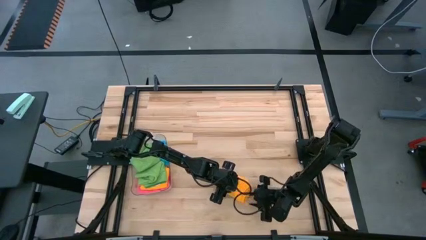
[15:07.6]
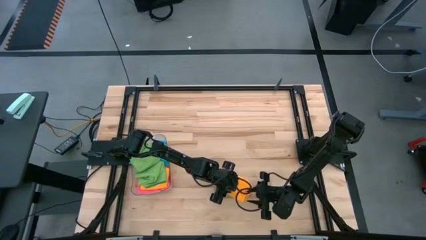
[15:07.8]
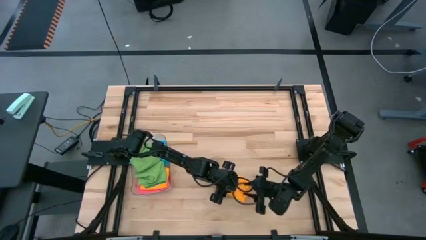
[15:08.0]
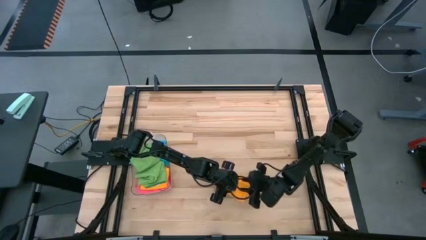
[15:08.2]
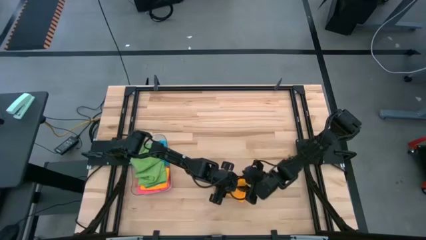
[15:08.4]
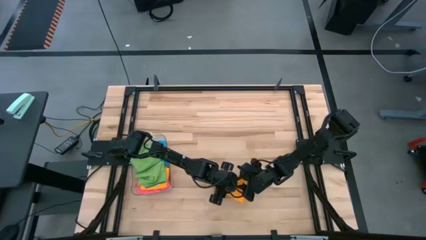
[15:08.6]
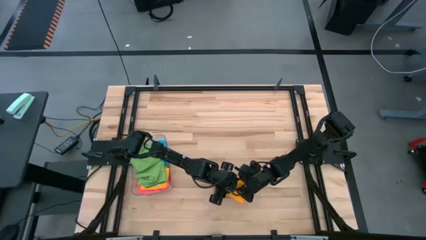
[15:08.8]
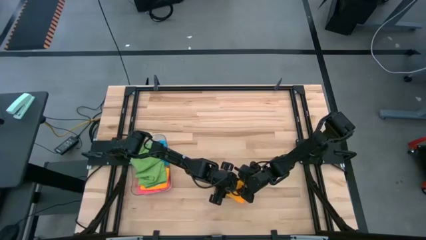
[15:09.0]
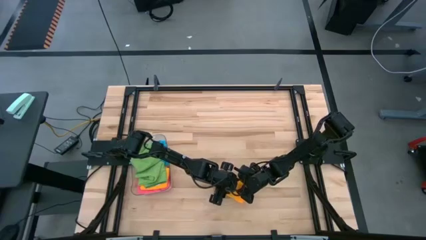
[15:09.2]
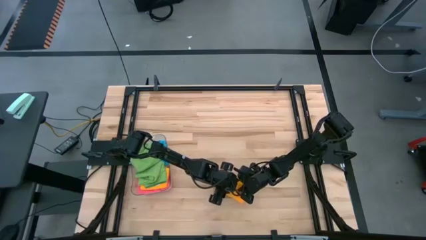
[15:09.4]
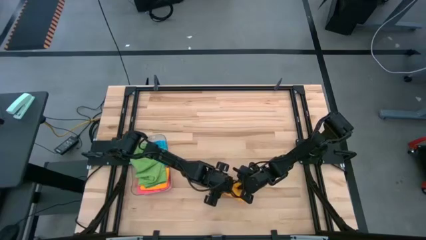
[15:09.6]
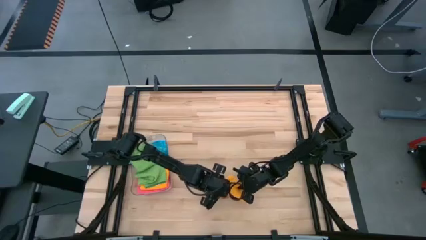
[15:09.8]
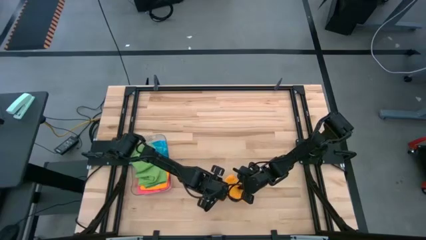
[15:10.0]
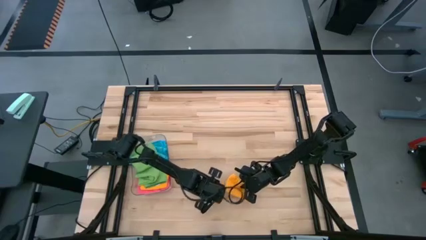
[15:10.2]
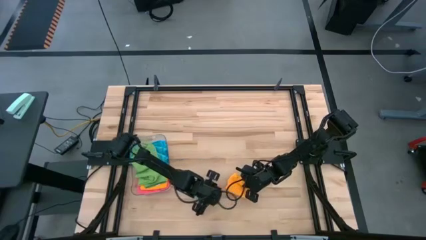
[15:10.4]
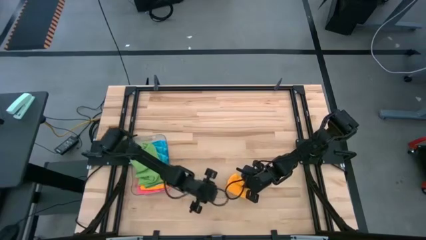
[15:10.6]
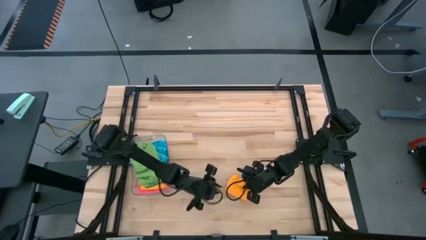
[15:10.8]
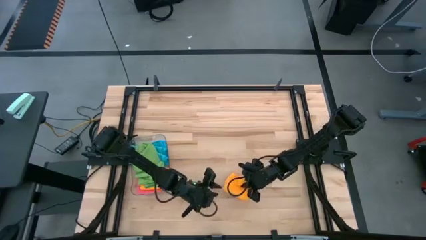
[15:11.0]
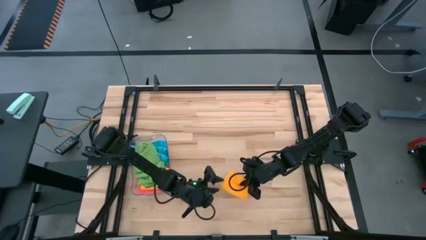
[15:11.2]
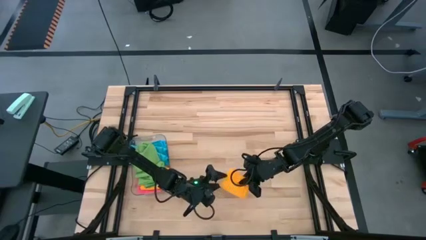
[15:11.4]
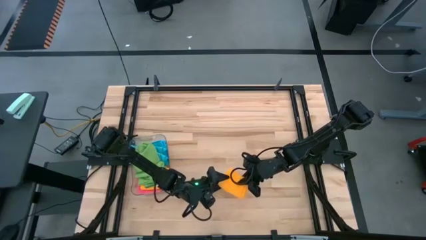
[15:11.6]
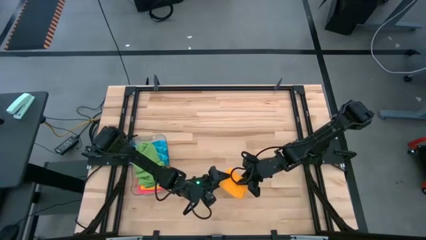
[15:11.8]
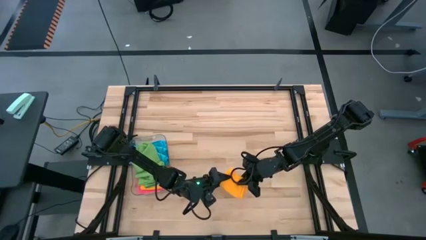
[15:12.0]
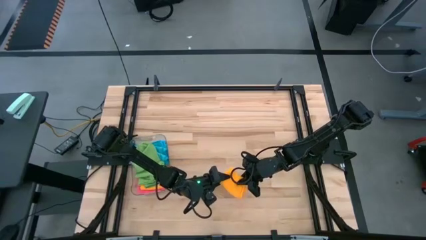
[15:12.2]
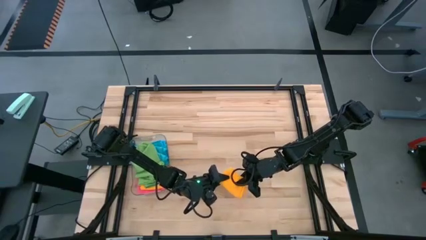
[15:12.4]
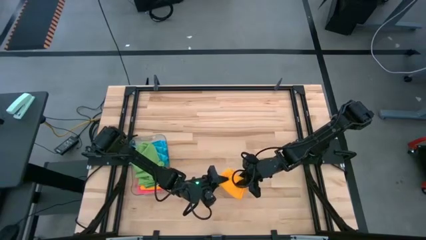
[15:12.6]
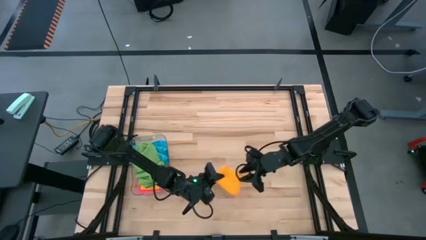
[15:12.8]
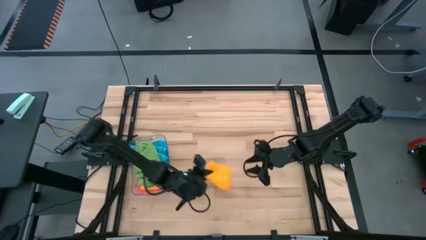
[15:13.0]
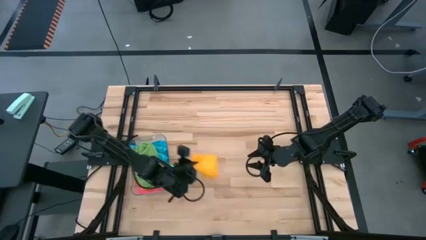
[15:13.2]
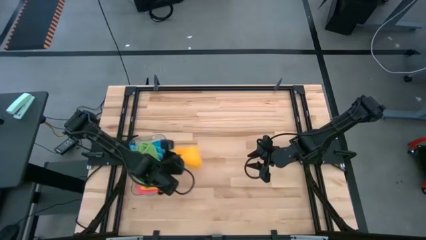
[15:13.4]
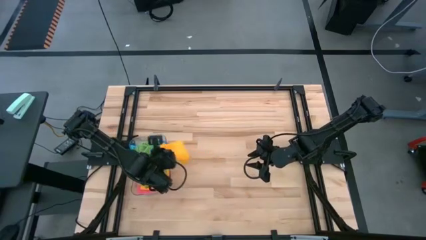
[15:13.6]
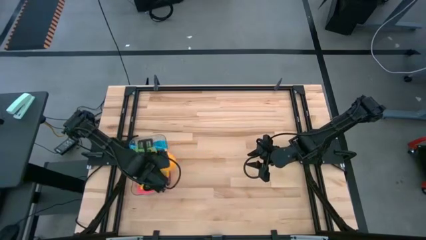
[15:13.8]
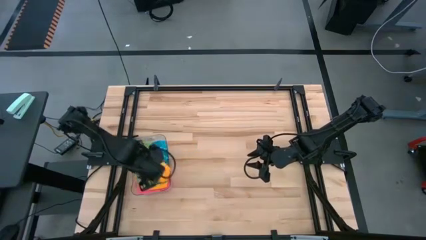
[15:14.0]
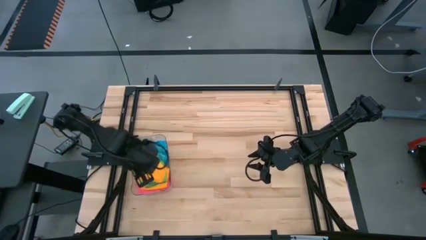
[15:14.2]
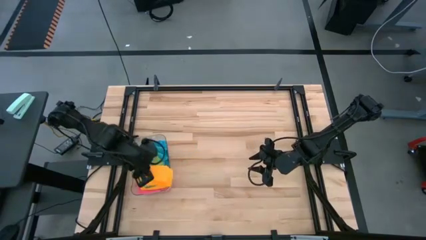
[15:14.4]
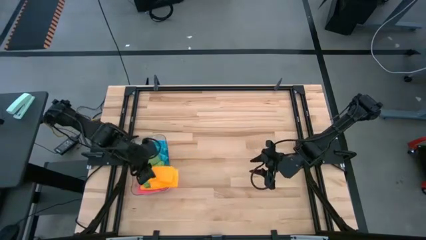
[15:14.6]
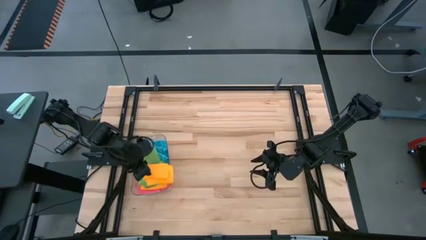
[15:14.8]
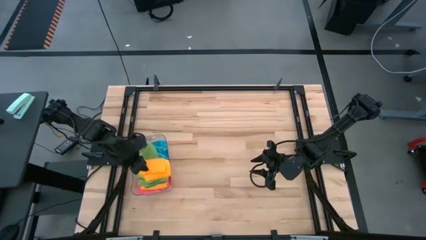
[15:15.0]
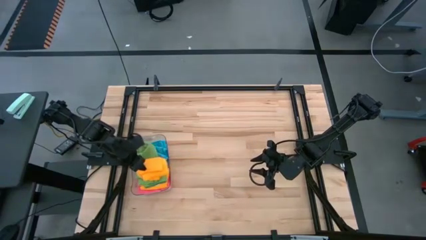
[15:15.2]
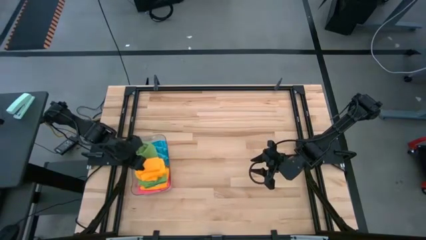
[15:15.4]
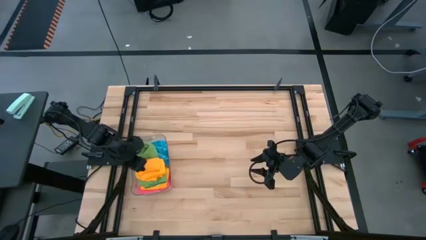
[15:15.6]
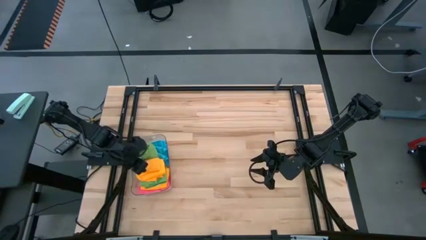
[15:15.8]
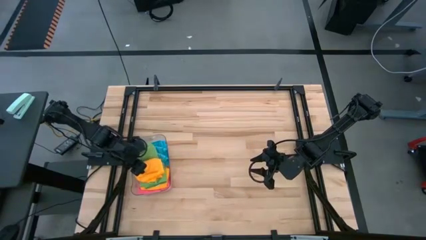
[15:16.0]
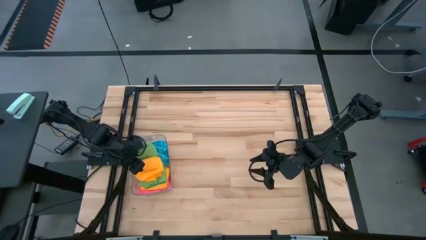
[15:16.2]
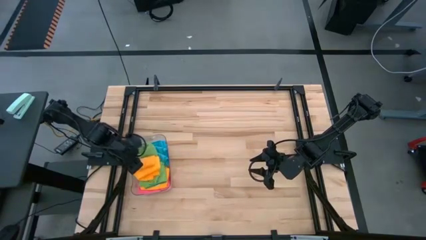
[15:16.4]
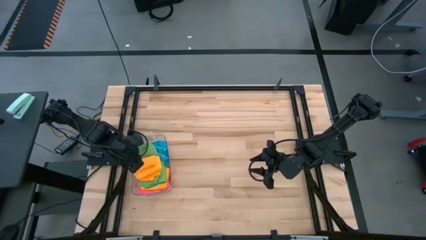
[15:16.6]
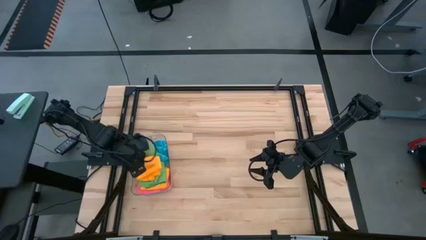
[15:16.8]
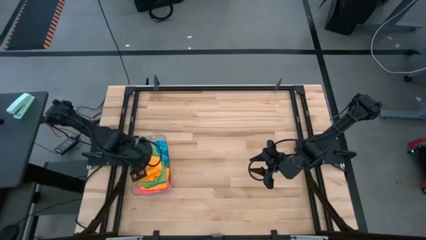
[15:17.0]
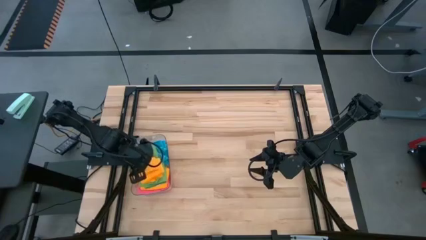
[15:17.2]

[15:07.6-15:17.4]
Task: Fold microfiber towels
Put the yellow microfiber cloth into the transparent bin

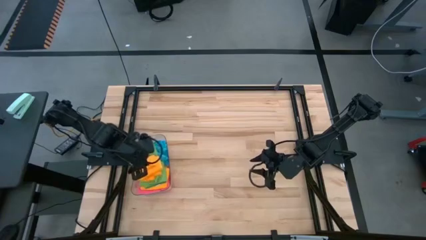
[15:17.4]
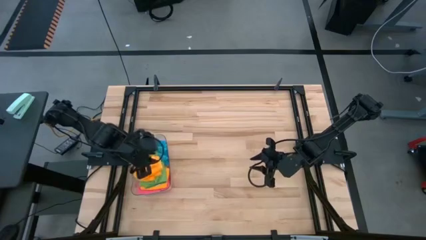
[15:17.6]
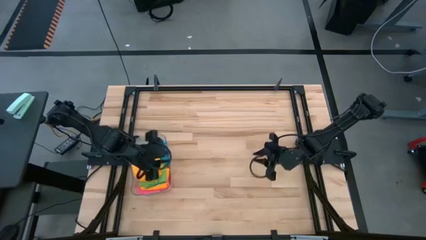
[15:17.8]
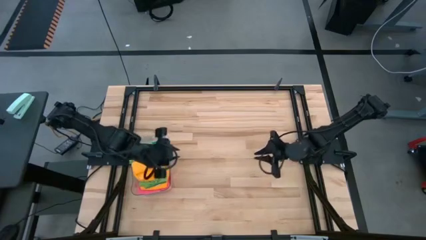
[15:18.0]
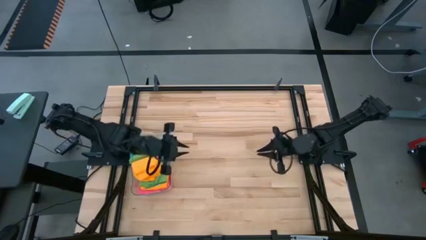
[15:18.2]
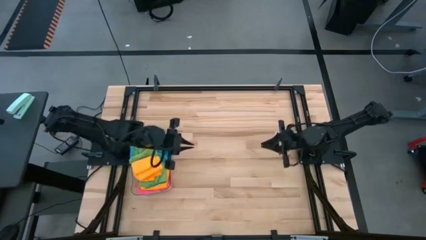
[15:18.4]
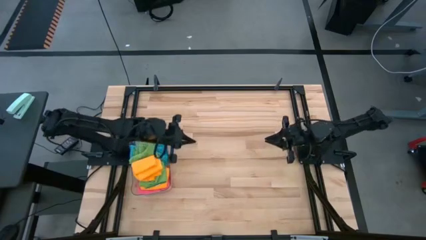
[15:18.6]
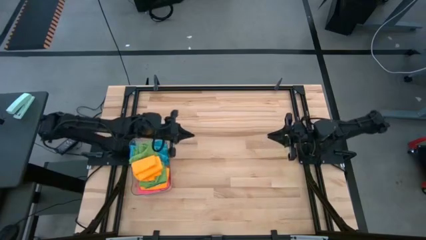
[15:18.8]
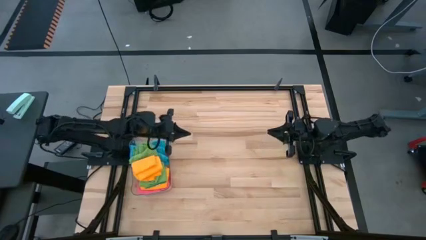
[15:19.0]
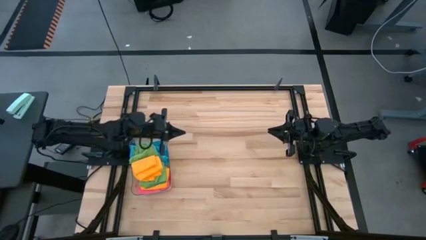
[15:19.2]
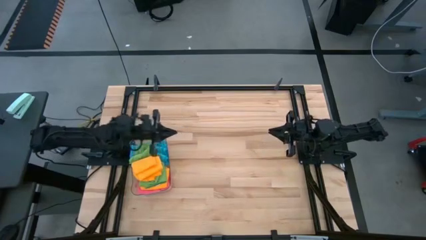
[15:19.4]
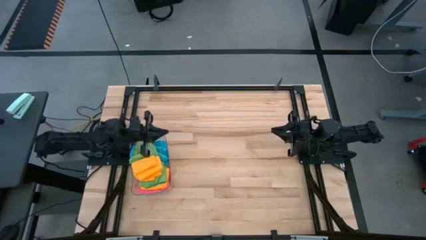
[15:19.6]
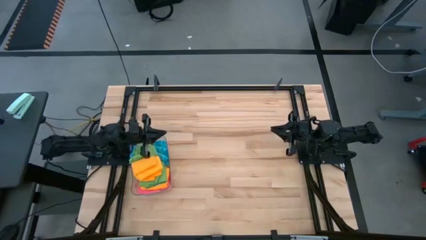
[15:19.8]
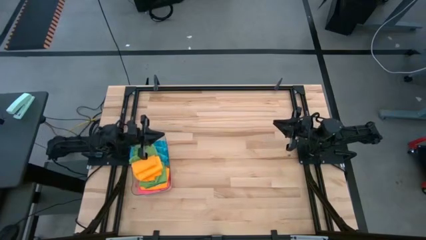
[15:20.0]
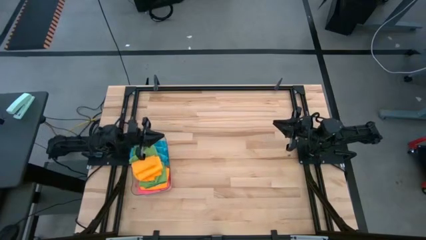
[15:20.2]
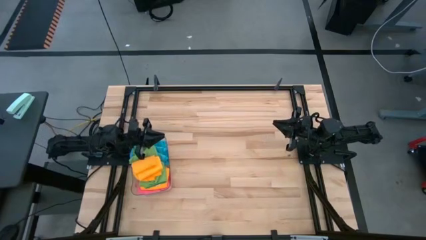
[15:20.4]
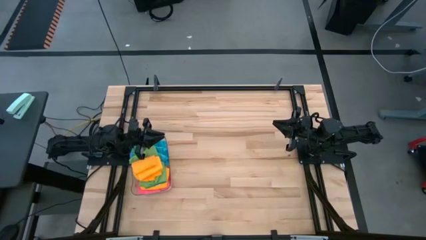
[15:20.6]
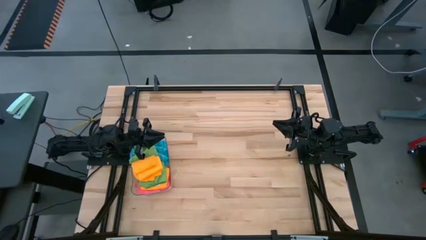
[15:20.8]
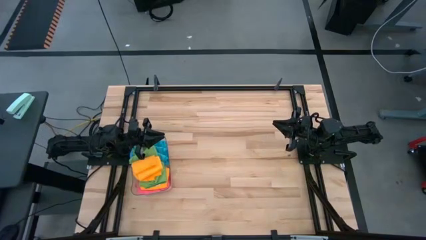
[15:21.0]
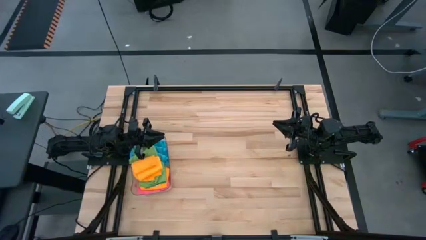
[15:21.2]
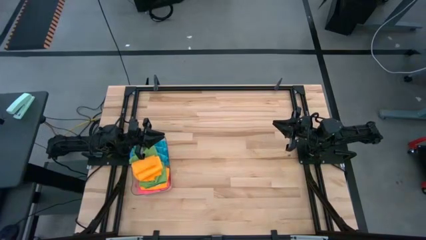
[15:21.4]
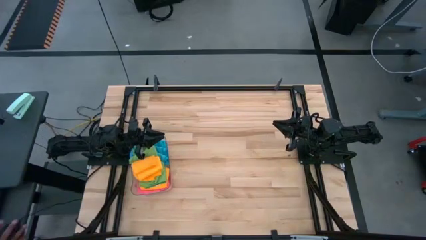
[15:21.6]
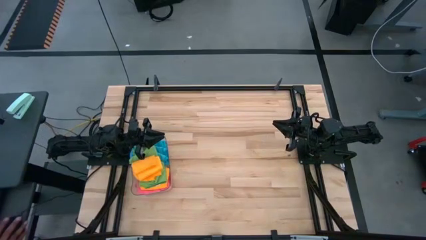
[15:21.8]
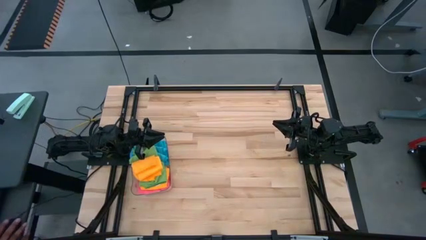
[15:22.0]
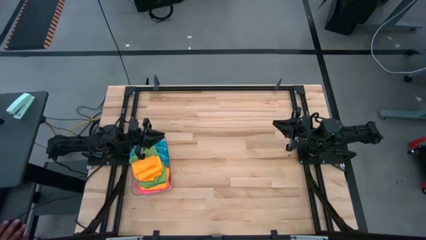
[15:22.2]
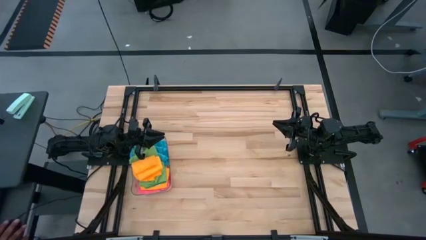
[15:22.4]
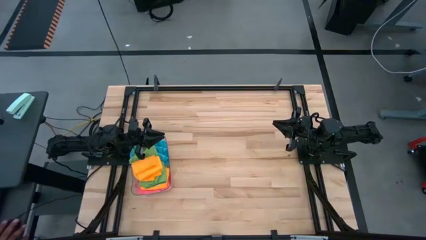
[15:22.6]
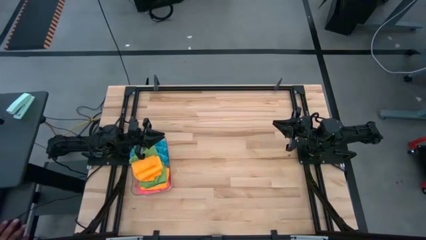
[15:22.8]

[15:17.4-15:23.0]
Return to Home Position
